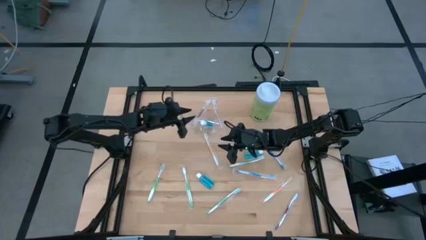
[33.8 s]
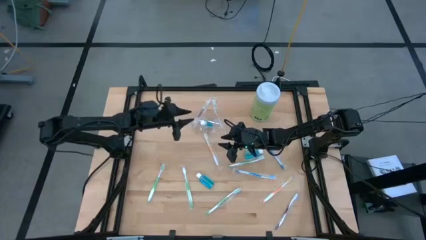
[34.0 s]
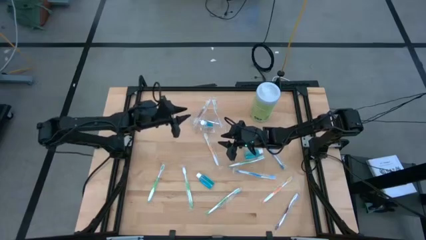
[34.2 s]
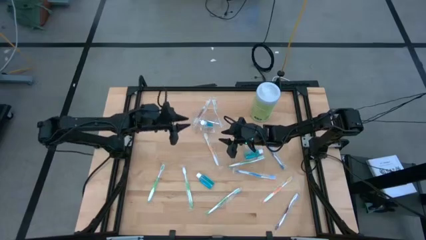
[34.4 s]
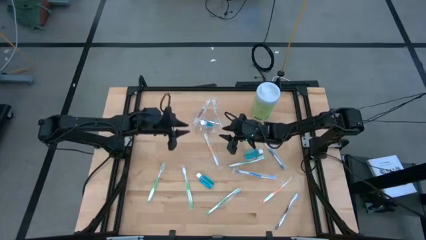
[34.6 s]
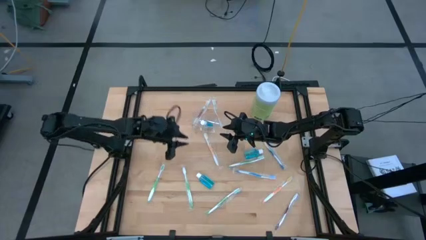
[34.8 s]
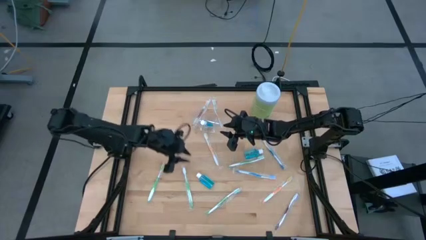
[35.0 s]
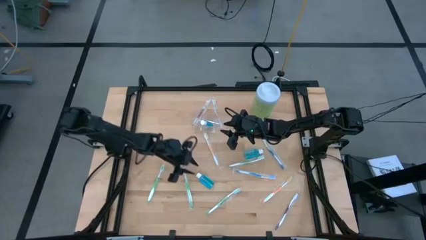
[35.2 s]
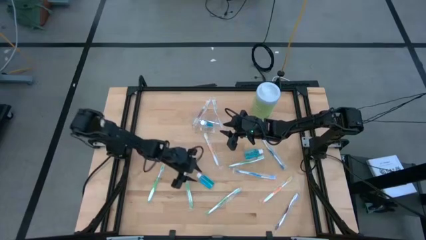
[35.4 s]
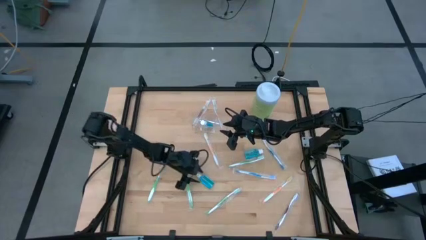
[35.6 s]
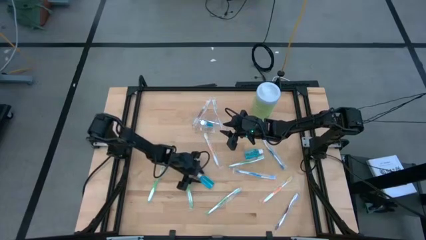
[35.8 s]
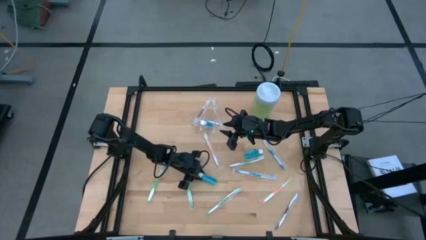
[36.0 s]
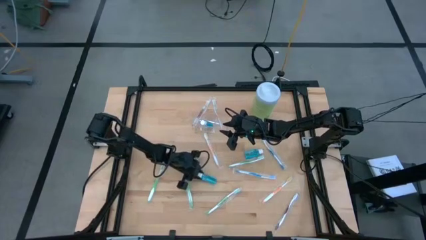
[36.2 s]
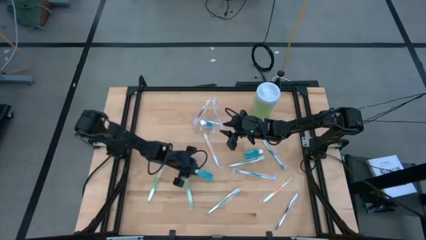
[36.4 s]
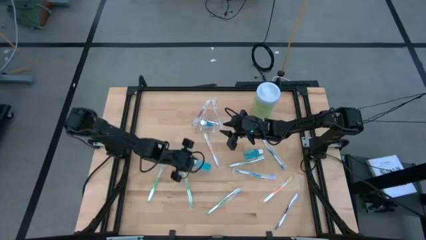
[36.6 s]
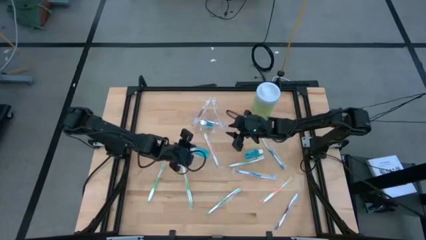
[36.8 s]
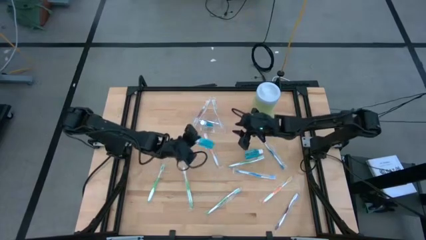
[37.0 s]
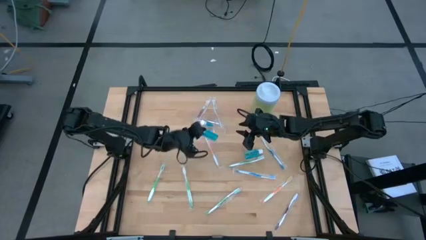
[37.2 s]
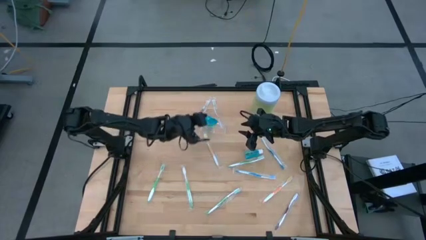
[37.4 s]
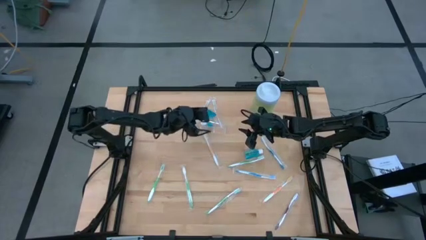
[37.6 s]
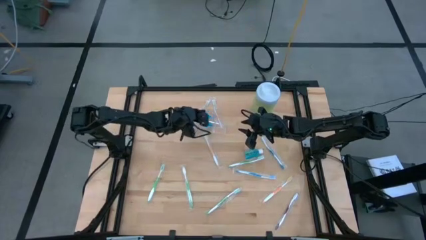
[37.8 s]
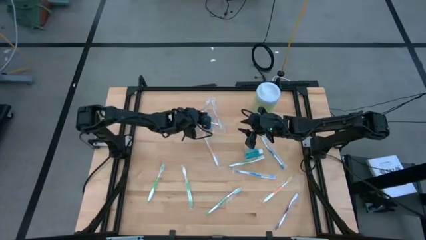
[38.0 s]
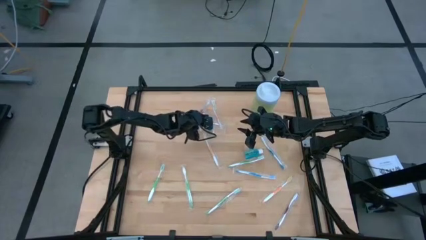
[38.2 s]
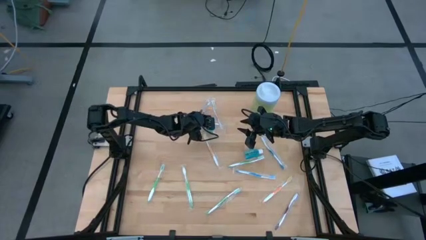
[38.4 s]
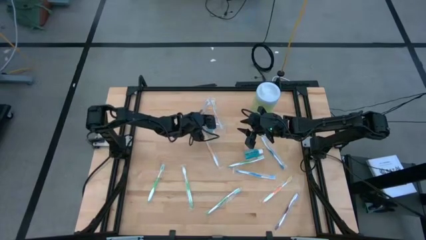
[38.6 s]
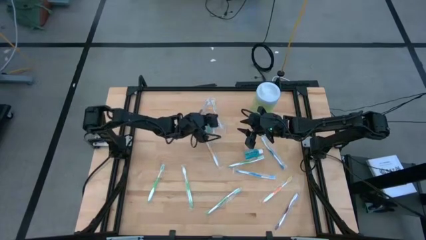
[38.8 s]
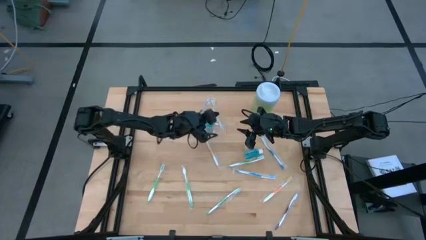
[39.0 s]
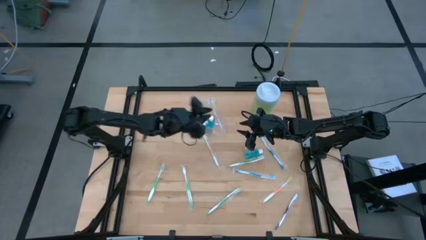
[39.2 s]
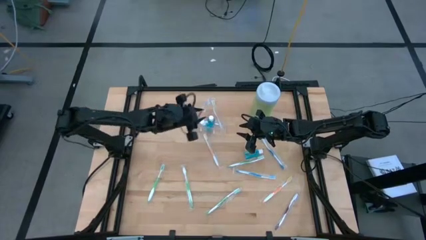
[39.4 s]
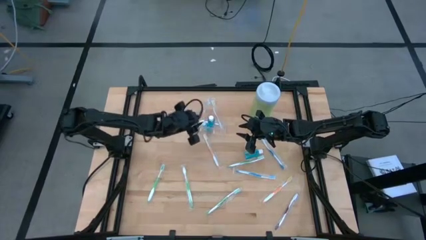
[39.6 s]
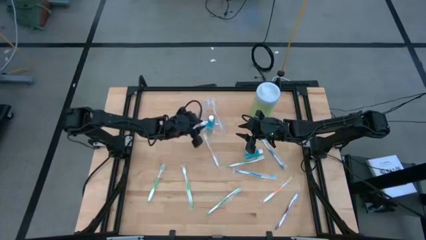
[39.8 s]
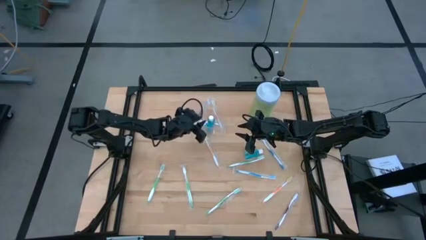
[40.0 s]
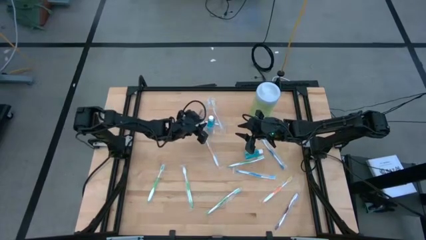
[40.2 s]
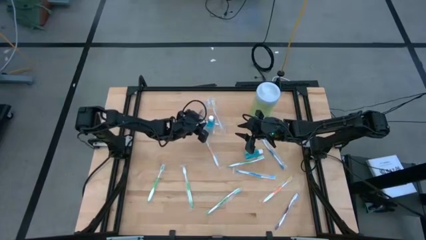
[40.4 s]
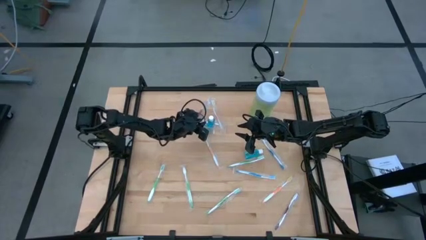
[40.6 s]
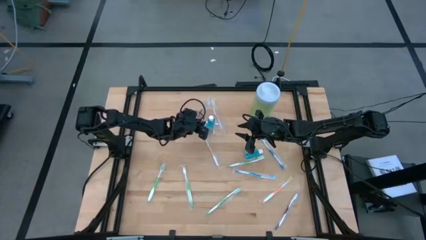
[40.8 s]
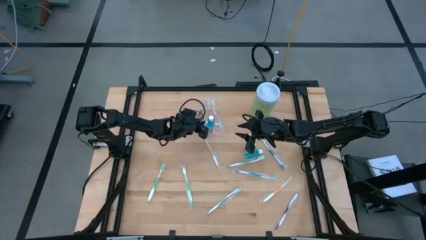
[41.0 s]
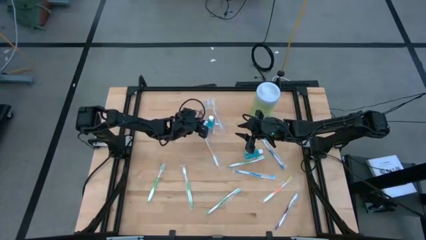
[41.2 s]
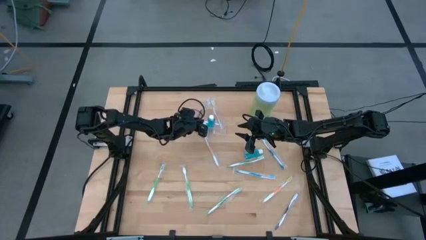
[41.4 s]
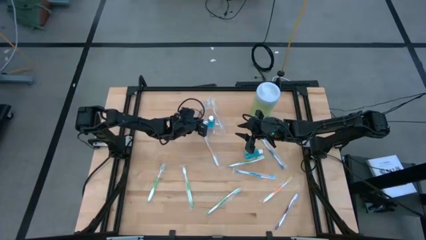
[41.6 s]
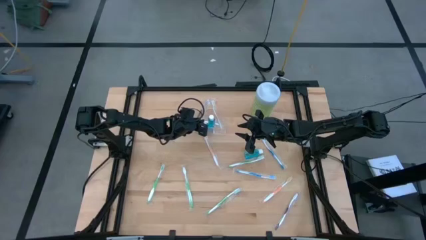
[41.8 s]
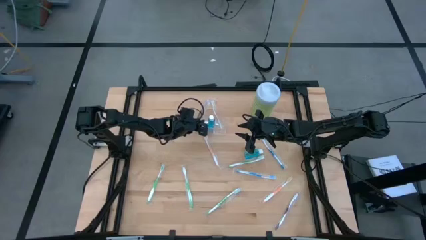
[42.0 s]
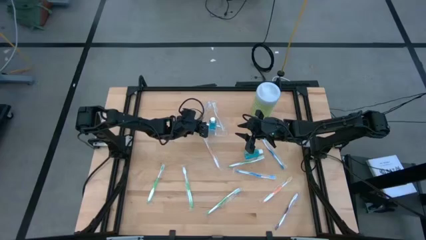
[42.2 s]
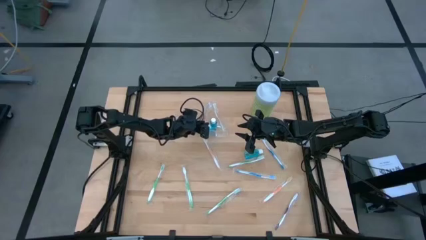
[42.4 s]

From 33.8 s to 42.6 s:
Task: Pick & Place toothbrushing station
Put the blue mouthwash into the transparent organizer

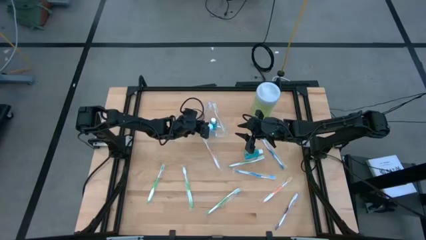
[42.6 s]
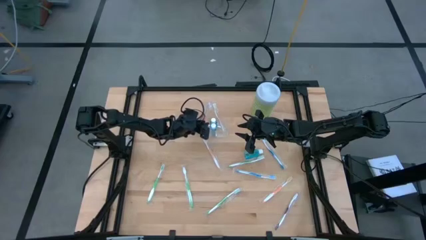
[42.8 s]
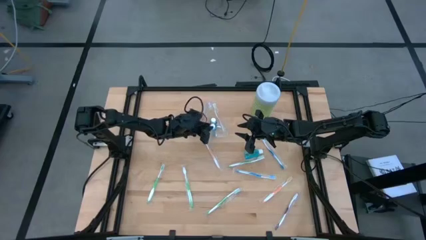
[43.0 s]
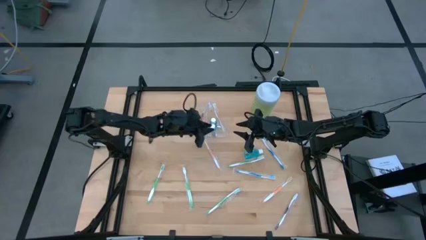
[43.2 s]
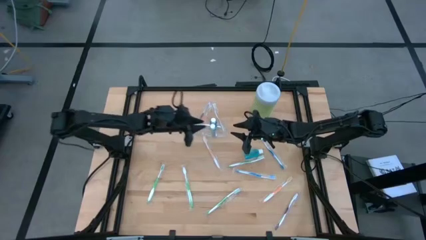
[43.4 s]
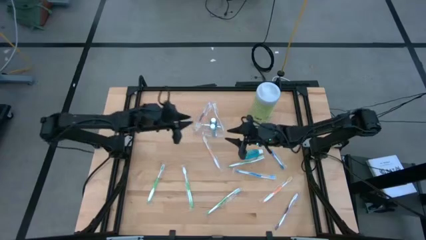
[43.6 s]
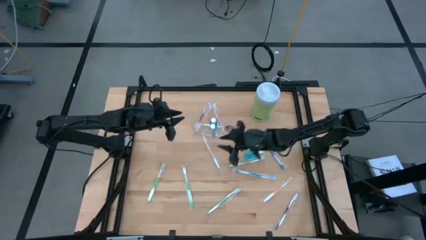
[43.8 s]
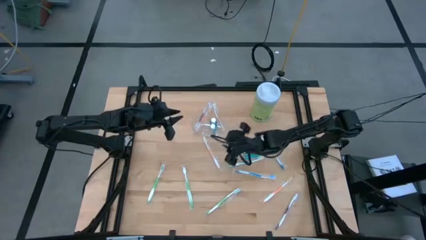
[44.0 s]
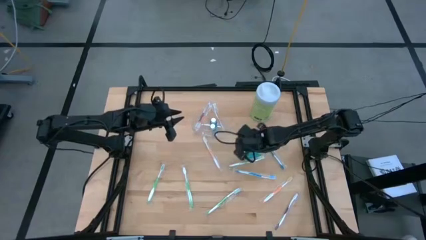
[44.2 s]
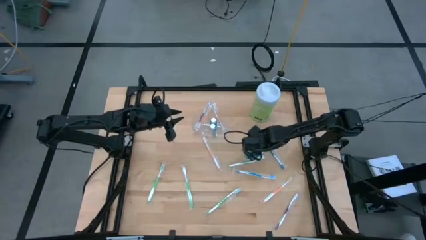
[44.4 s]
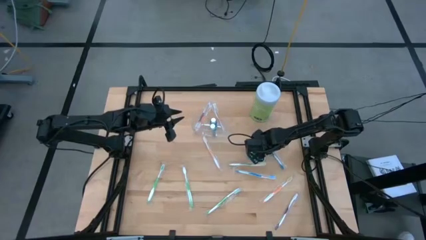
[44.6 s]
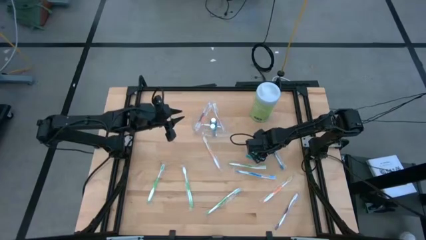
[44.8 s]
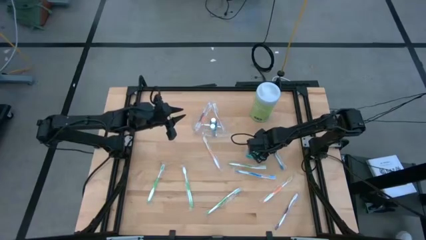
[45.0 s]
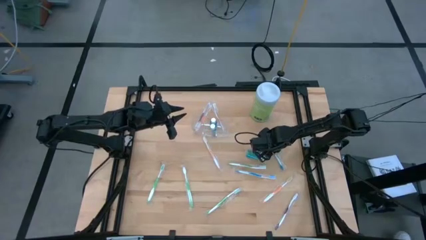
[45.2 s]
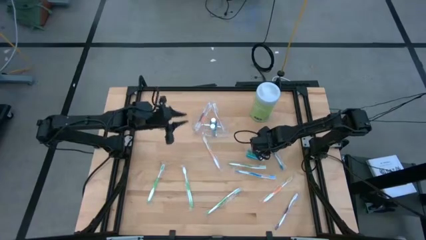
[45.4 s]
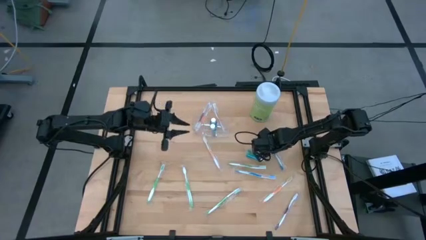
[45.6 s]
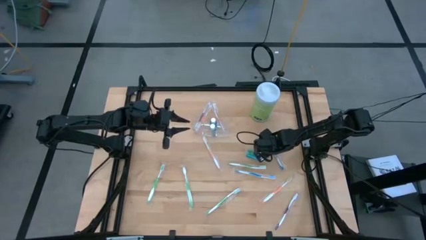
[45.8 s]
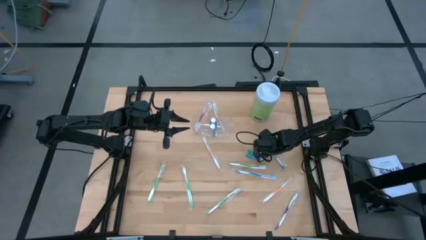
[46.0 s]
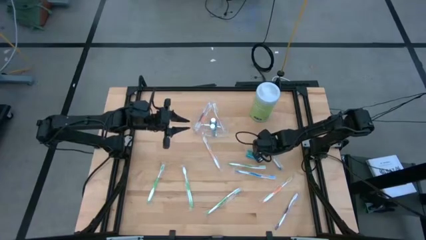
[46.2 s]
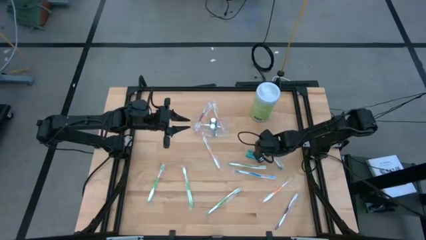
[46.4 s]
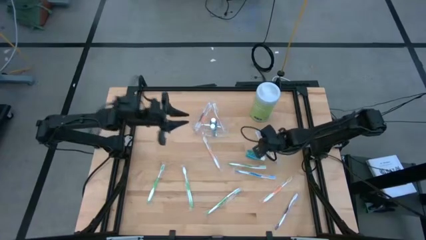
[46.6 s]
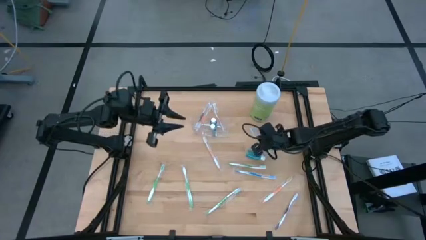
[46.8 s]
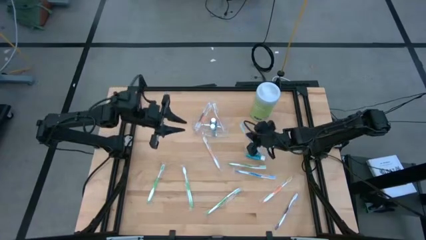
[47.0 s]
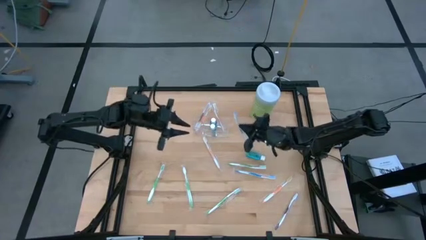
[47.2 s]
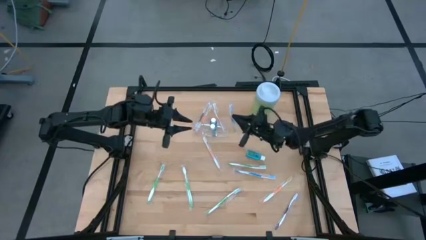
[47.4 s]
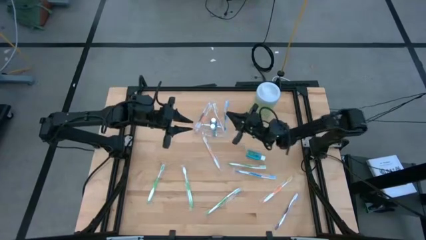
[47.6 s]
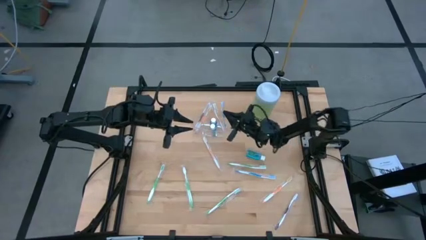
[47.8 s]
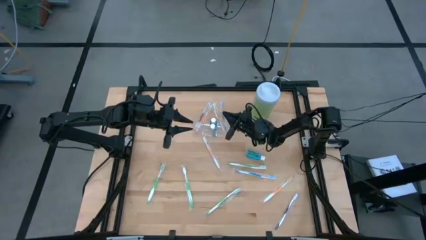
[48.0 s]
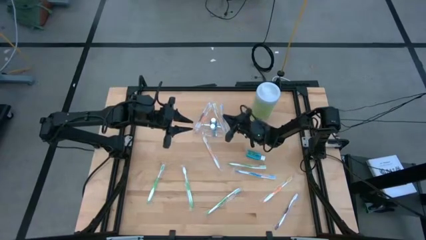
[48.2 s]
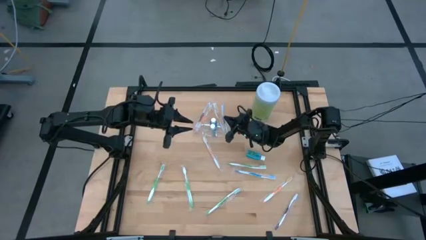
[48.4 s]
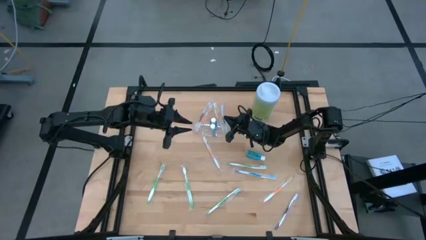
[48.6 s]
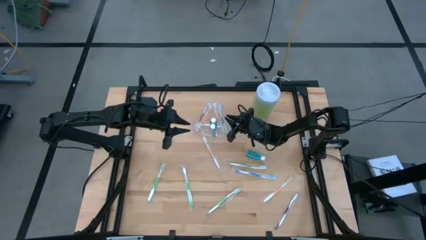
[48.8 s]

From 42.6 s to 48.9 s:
Put the blue toothbrush into the transparent organizer

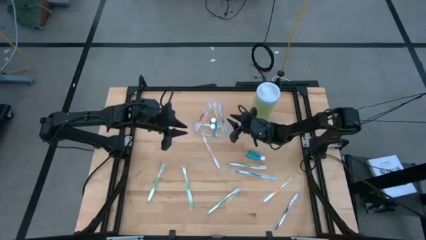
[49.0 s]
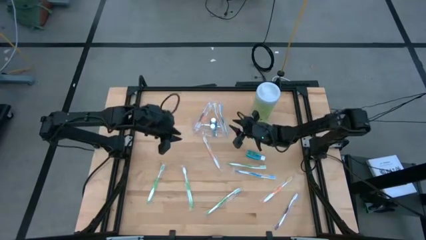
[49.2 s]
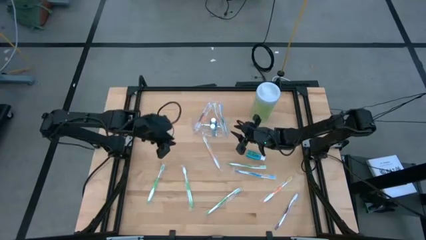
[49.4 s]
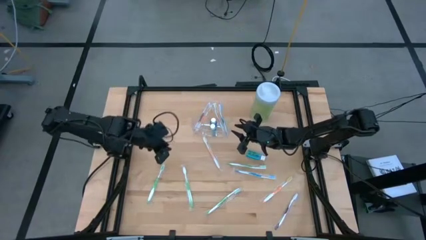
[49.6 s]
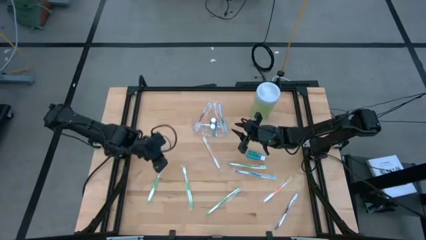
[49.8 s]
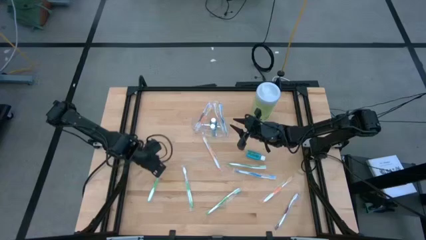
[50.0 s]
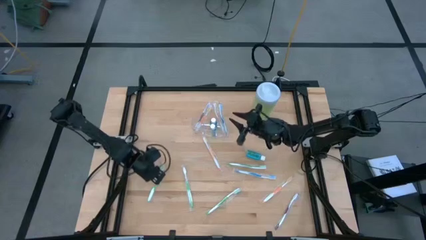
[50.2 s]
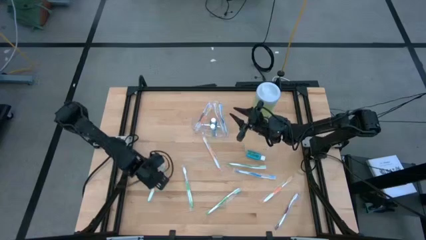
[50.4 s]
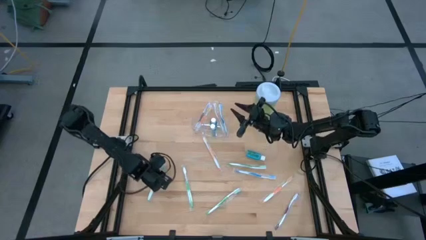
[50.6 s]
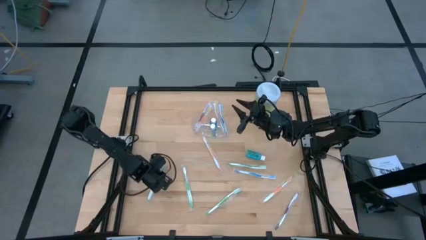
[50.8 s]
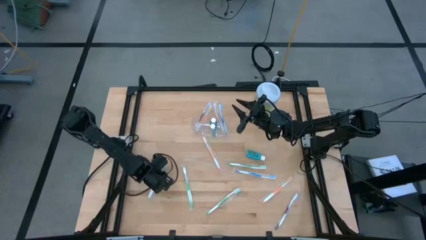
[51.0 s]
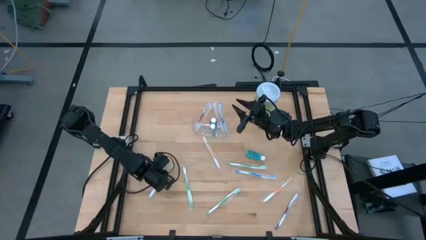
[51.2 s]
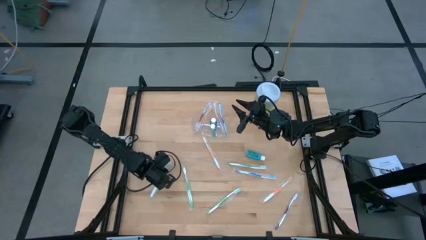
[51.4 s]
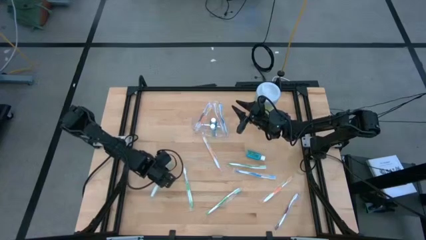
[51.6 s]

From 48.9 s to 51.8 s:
Put the green toothbrush into the transparent organizer
